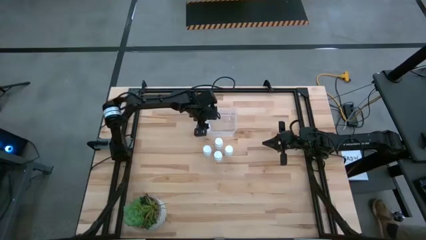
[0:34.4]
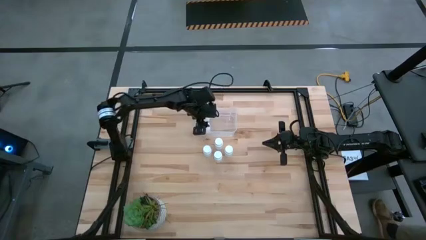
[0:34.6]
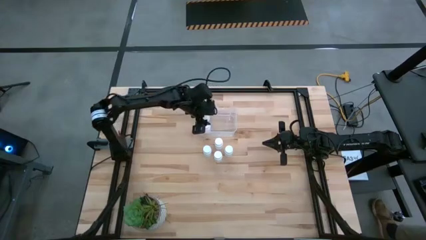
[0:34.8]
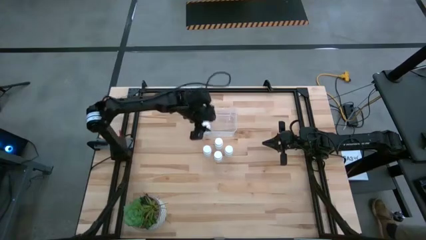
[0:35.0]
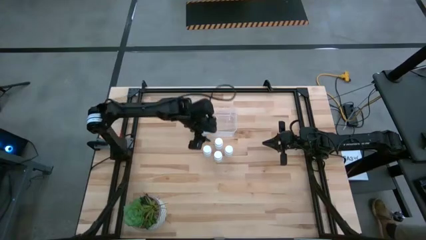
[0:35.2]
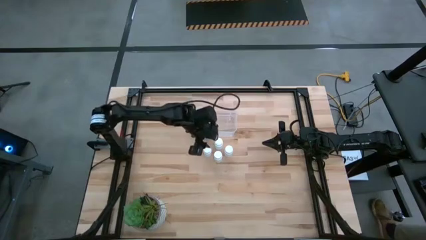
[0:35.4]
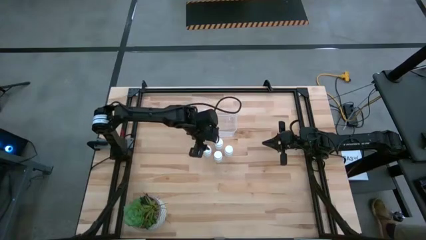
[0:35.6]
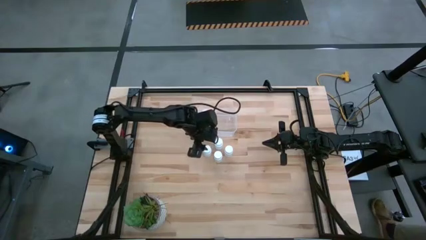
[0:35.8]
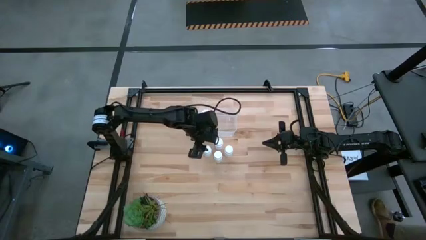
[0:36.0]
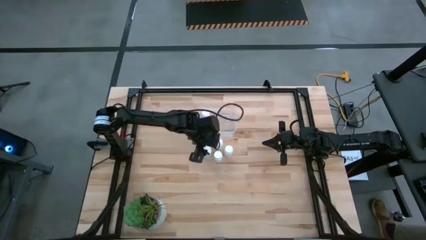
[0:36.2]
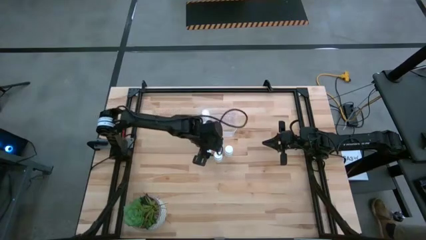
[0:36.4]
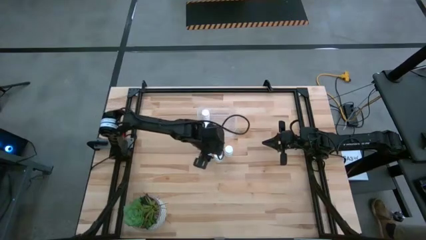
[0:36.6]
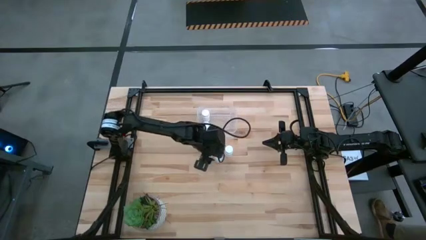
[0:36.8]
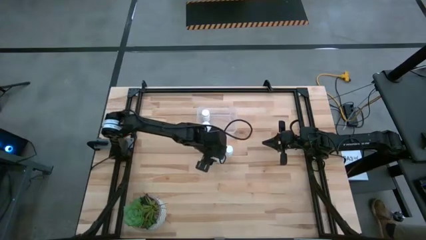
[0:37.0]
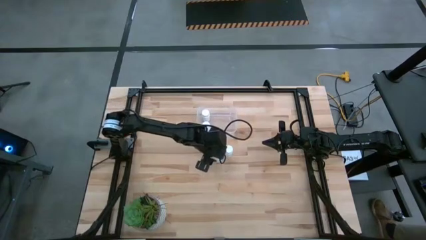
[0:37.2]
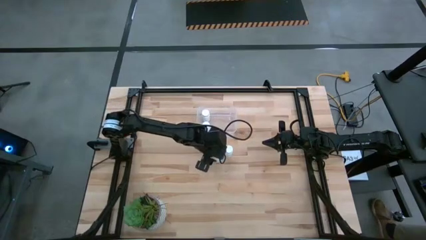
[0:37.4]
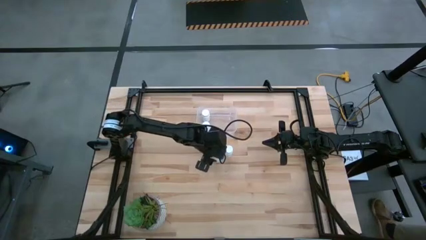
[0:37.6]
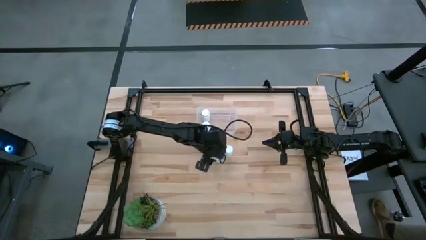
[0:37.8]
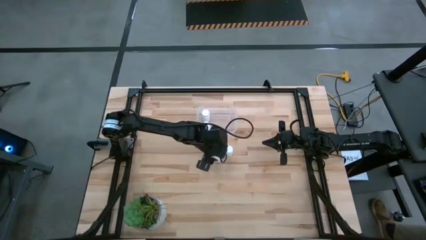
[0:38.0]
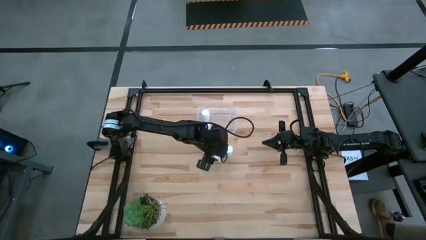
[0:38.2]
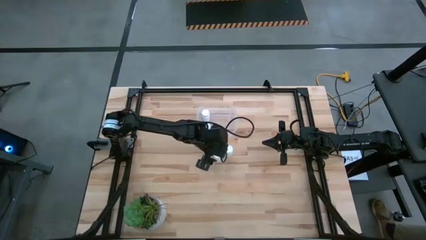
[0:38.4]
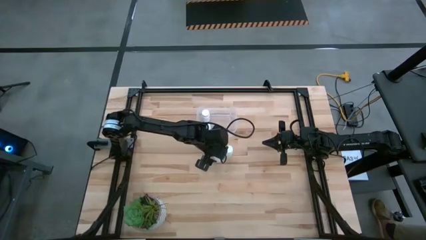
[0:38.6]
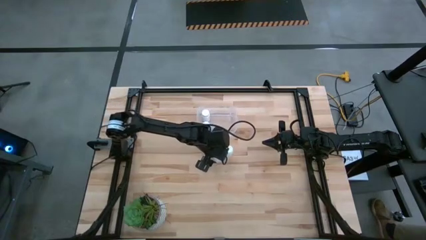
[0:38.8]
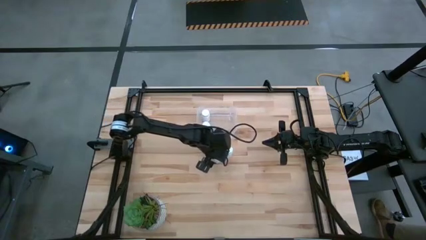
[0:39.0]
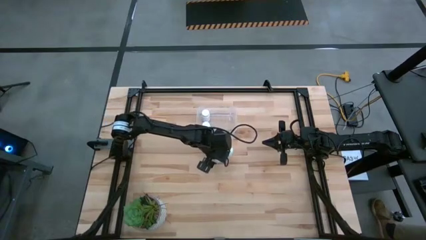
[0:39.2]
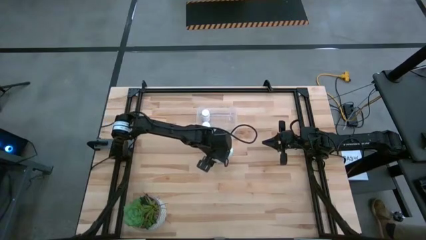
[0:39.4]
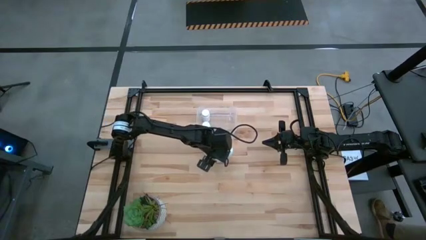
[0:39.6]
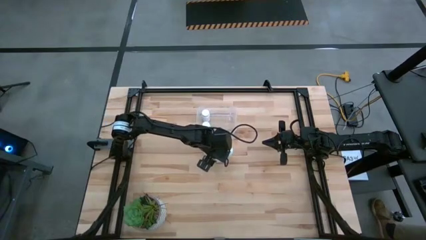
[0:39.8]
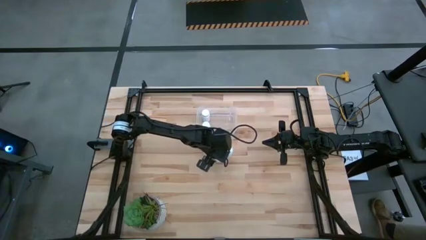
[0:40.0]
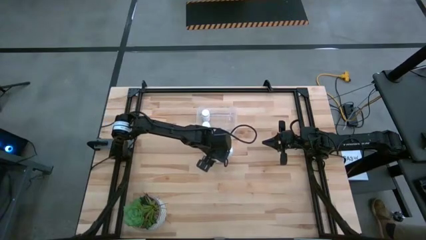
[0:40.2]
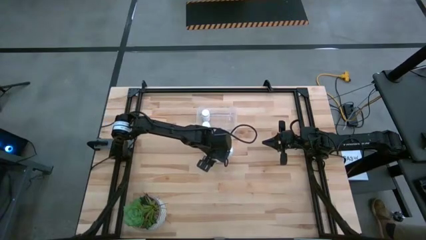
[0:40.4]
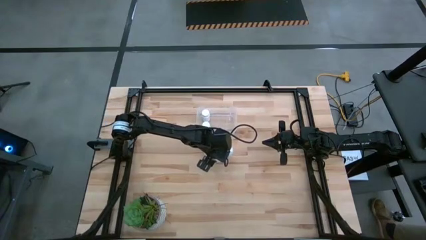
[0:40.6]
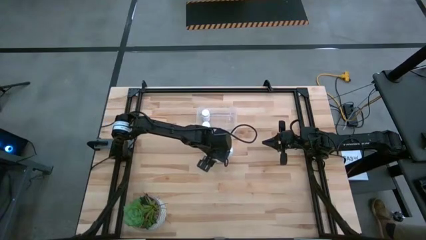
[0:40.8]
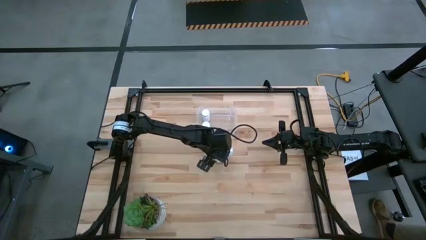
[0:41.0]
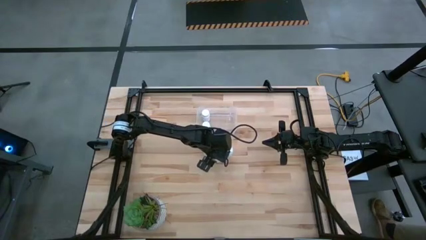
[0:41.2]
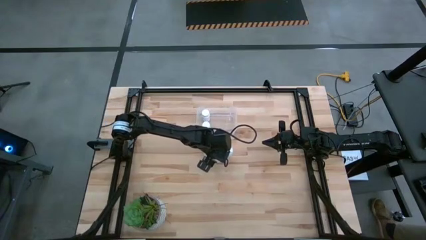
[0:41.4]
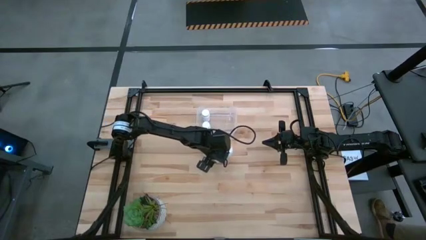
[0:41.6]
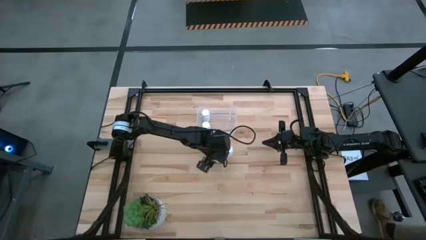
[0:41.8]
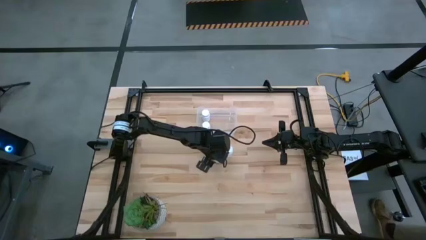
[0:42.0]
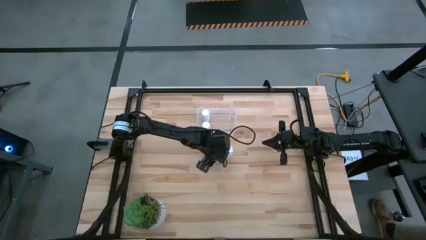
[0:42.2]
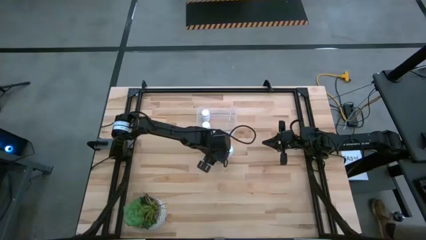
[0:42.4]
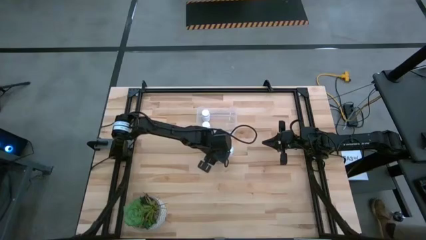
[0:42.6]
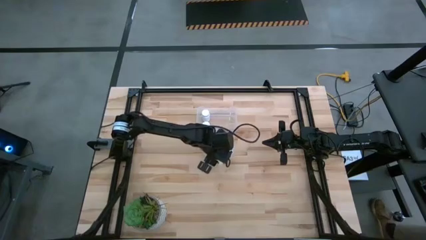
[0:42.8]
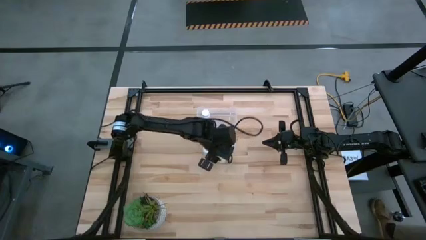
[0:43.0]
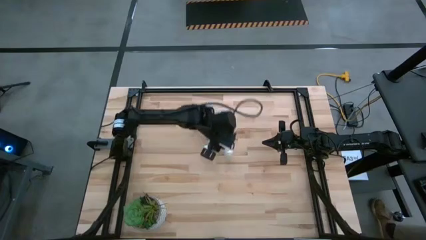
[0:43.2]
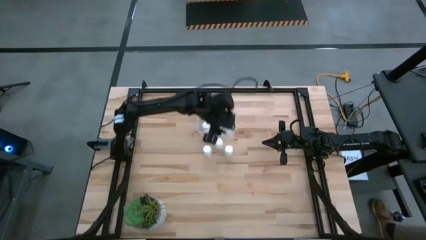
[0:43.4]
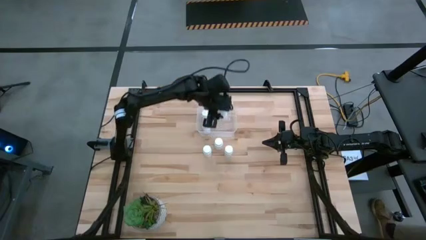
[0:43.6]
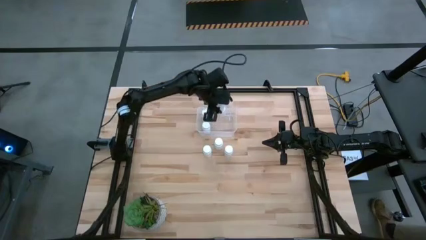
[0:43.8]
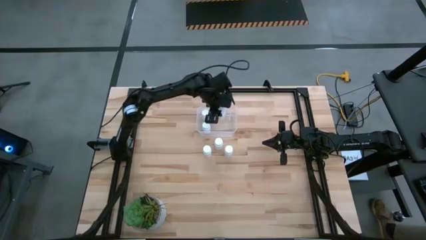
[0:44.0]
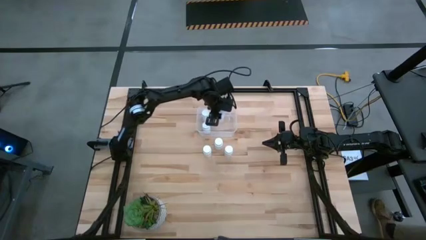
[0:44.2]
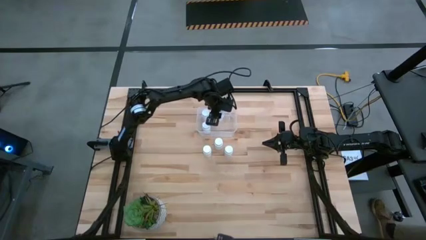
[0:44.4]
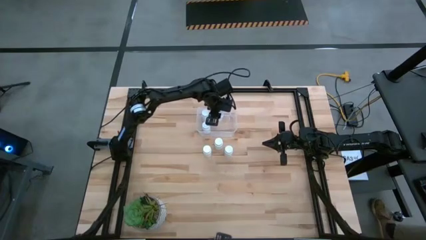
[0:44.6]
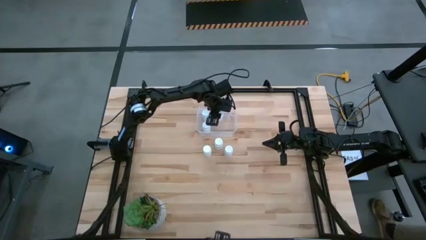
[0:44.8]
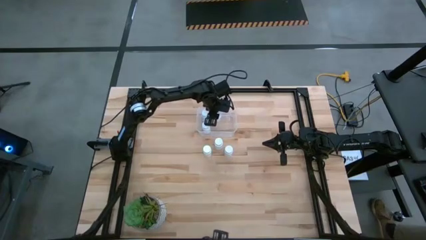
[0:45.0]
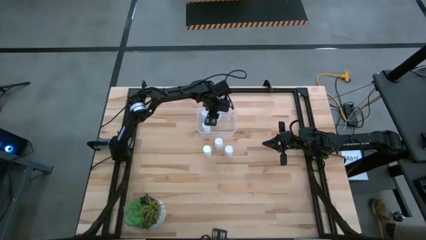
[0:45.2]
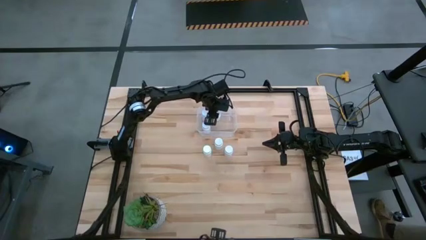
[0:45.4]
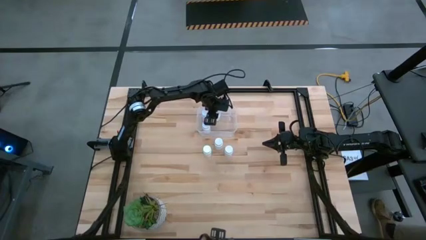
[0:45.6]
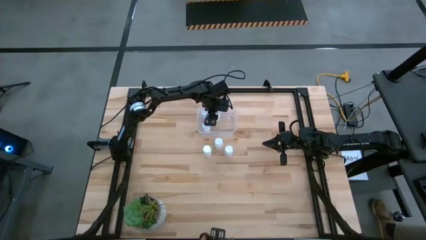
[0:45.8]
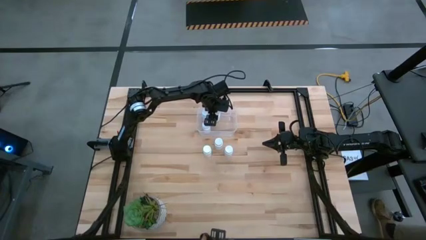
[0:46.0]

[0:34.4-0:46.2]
Task: Pick and place pill bottles into a basket
Put the white pill bottle into the transparent bin
